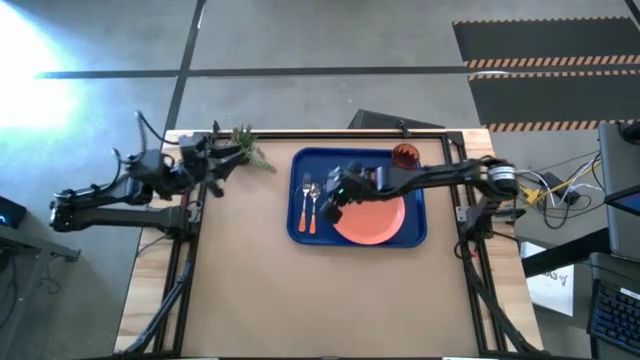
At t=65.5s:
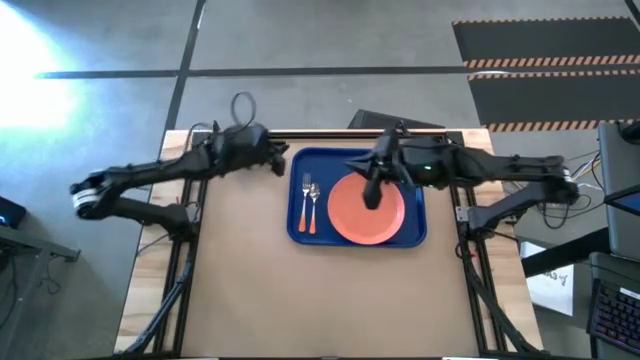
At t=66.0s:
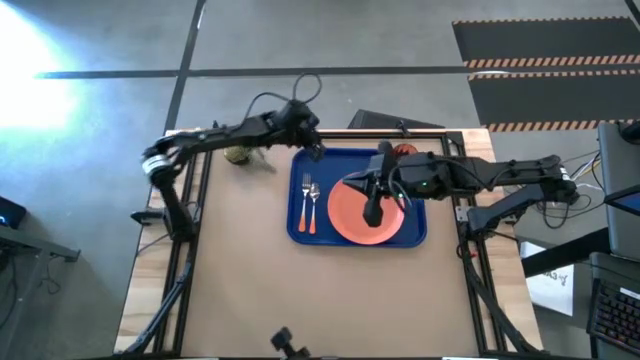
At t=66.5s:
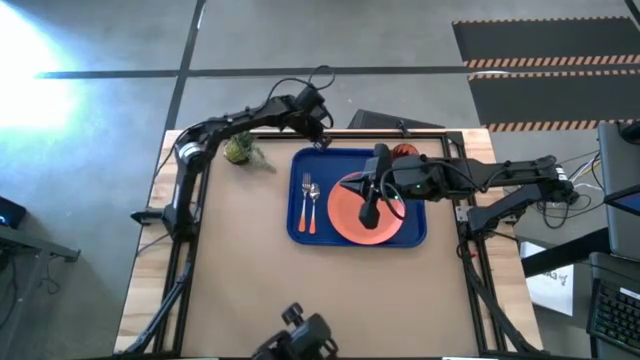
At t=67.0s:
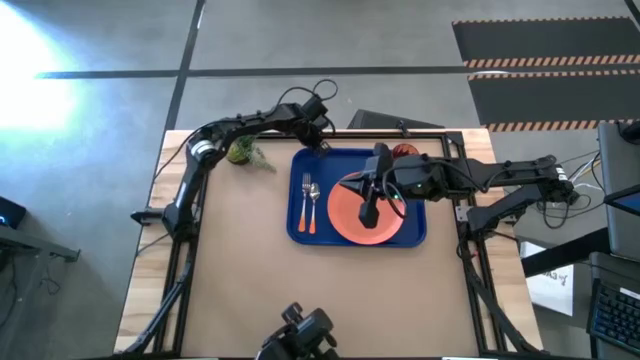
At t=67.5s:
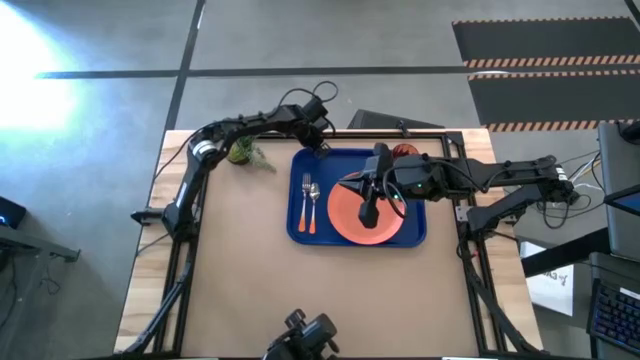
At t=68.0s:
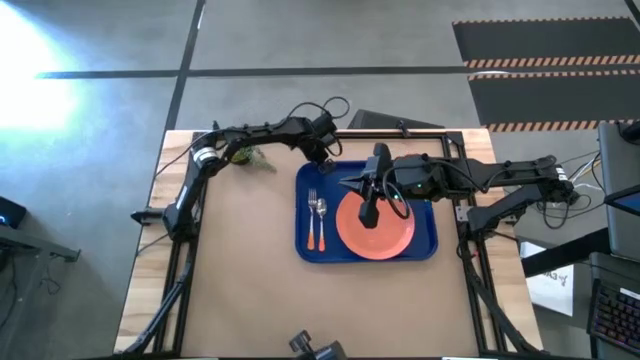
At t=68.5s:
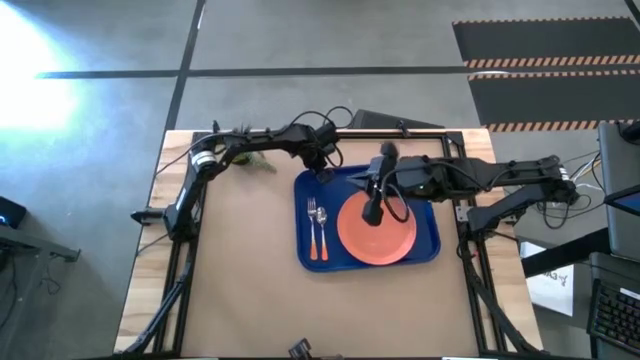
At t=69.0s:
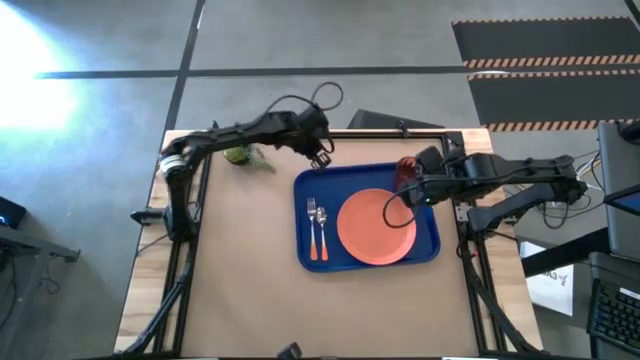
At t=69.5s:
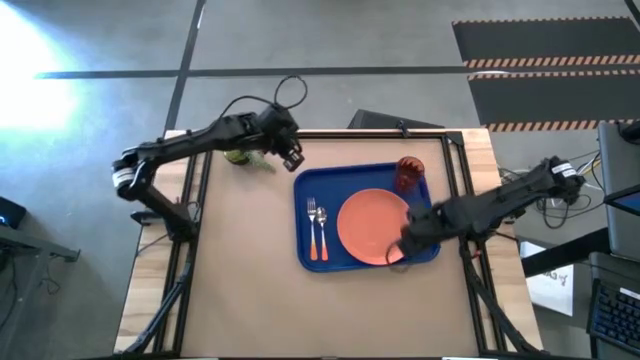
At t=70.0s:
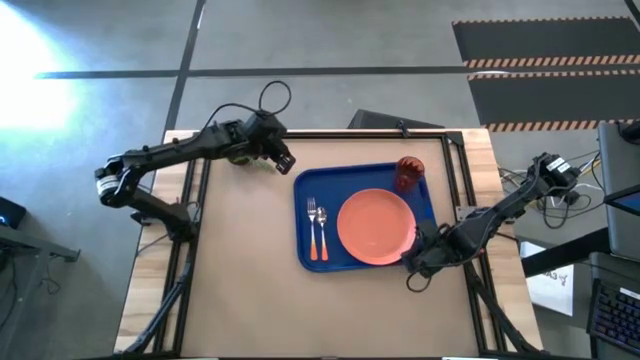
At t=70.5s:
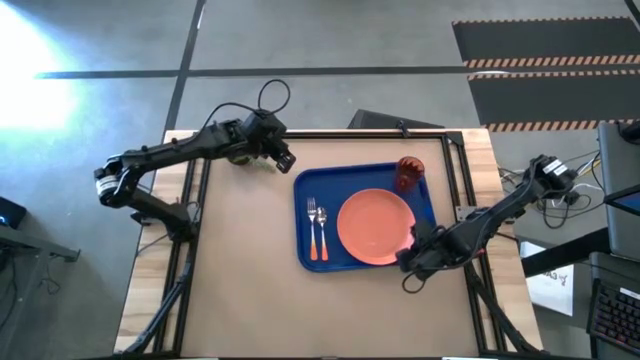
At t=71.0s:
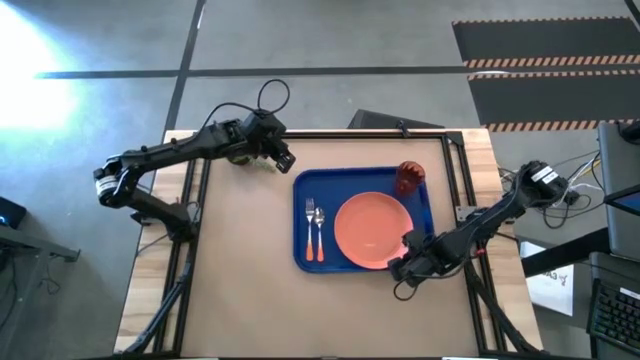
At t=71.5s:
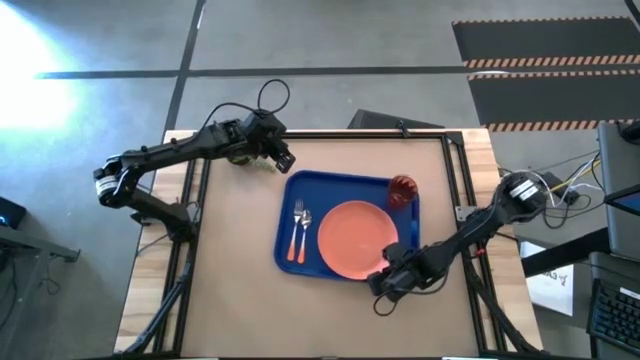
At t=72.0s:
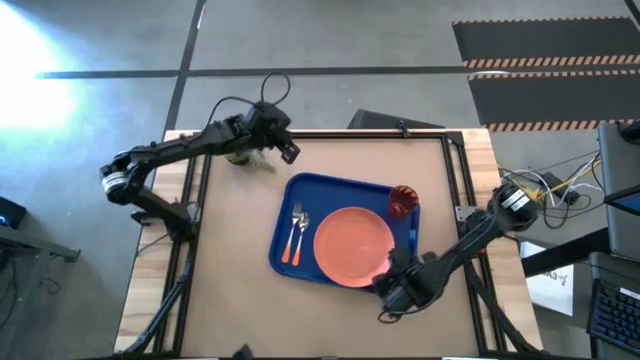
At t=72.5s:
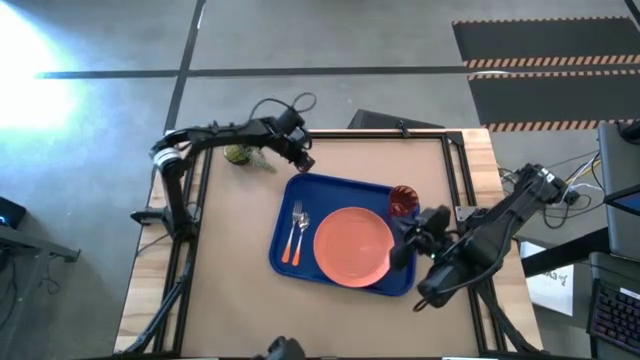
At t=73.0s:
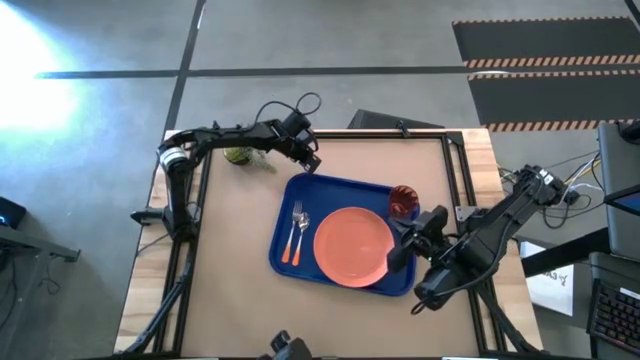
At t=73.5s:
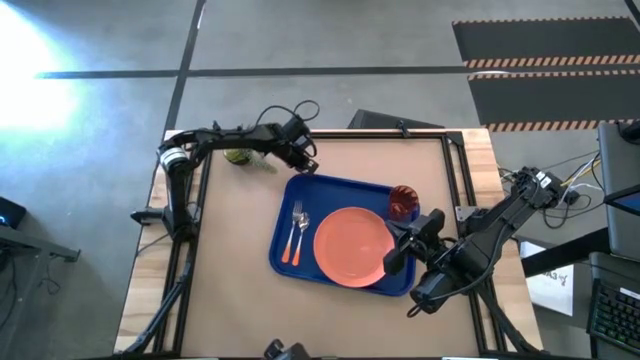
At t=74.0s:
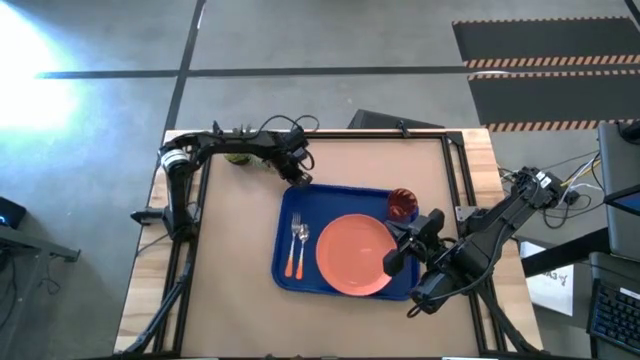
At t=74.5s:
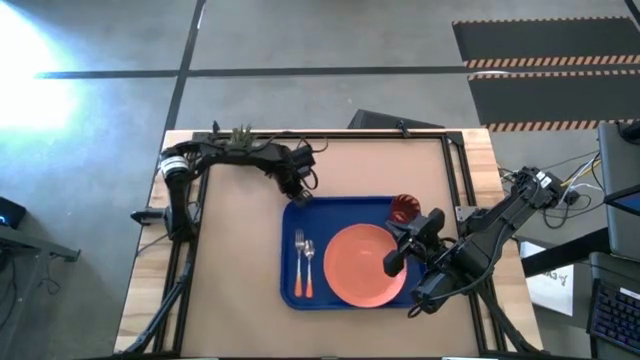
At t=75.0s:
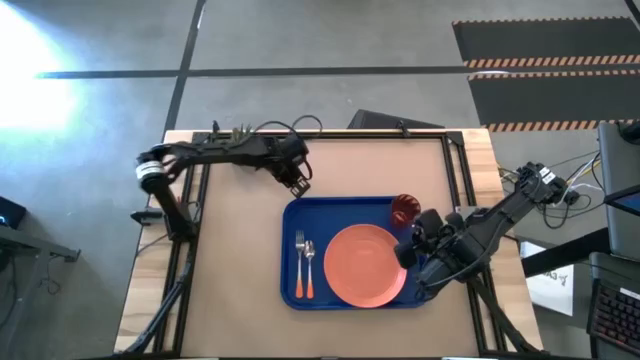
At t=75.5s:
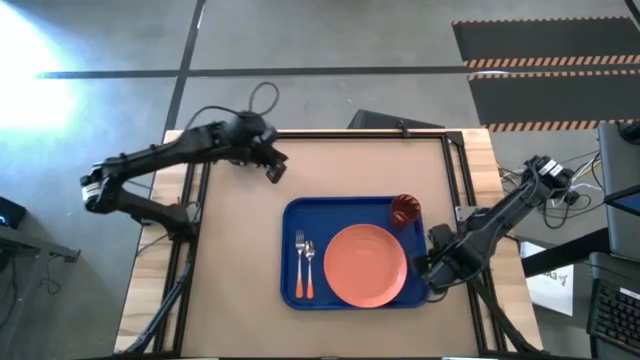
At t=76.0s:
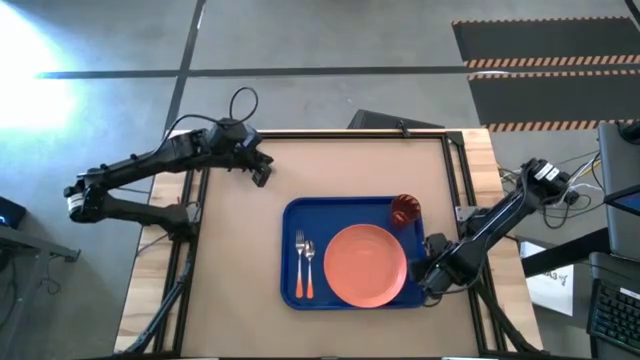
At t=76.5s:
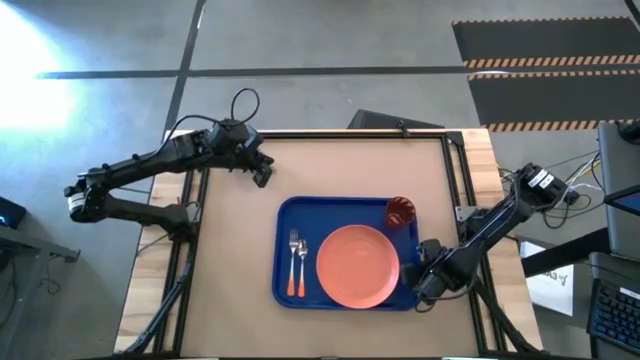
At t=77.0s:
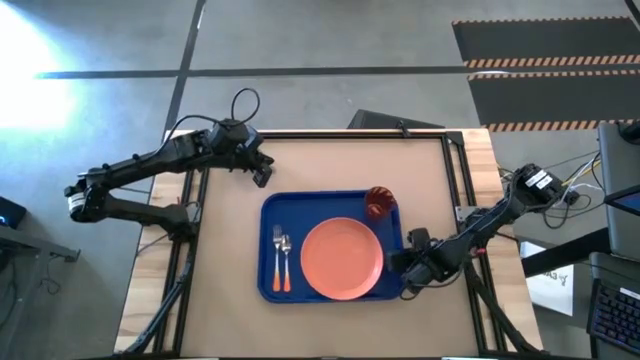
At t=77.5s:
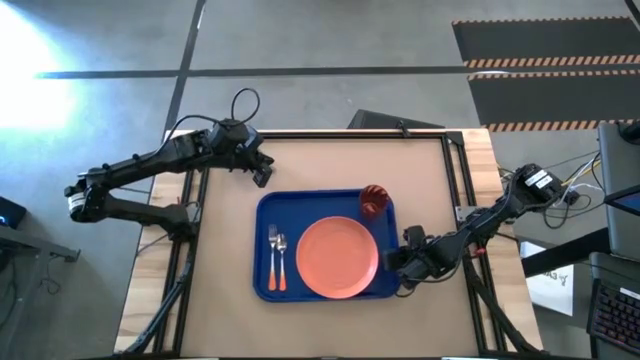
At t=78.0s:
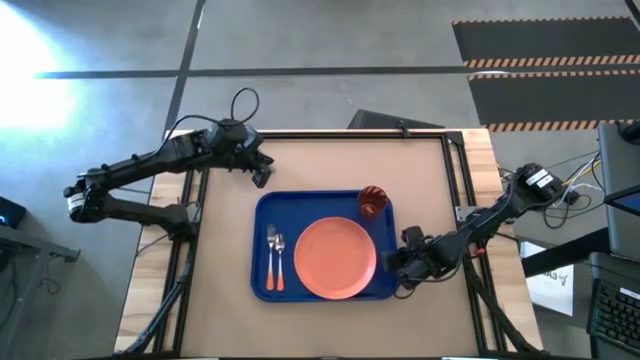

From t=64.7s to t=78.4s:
Task: Pick and place plate/cup/fork/spoon on tray
Move the blue serving tray to the center of the table

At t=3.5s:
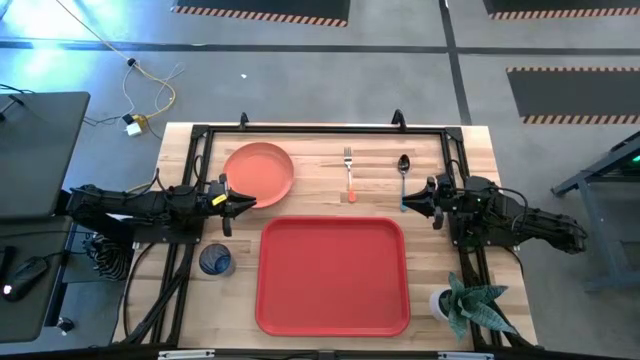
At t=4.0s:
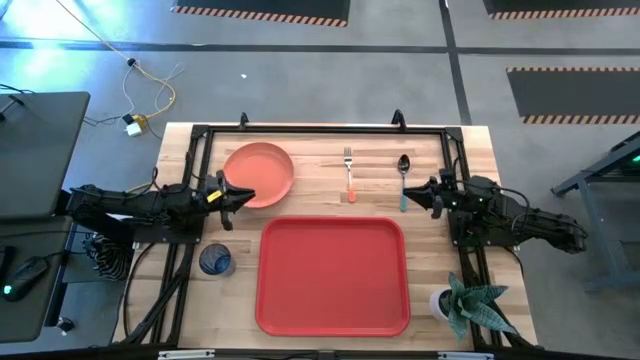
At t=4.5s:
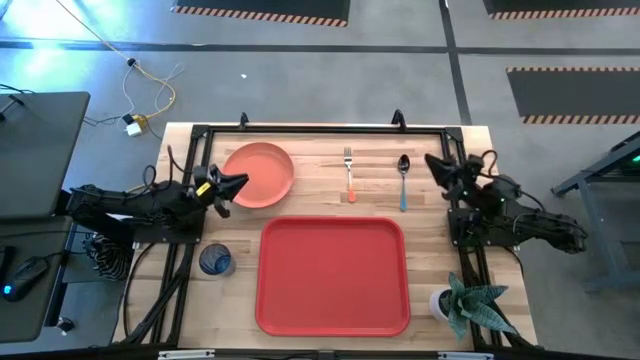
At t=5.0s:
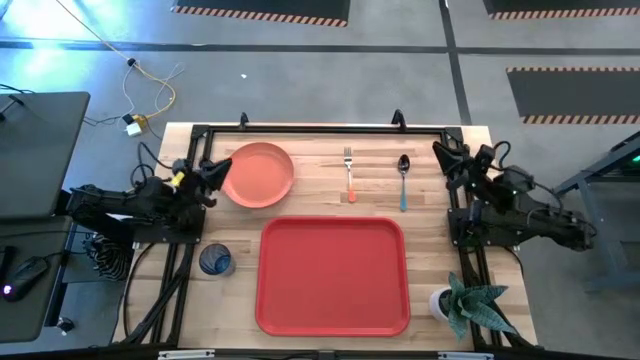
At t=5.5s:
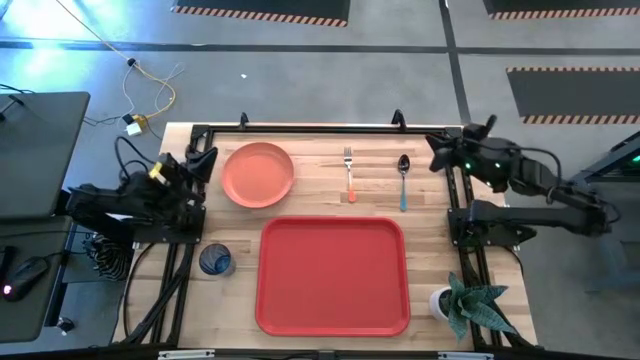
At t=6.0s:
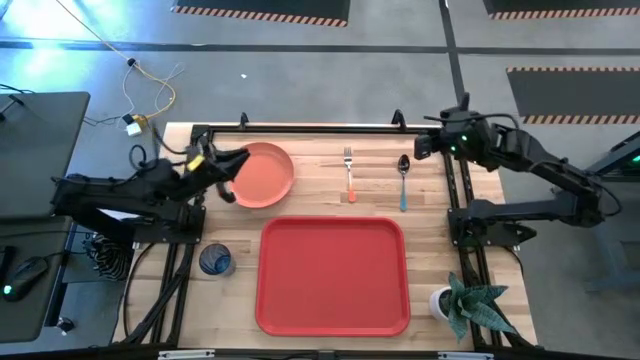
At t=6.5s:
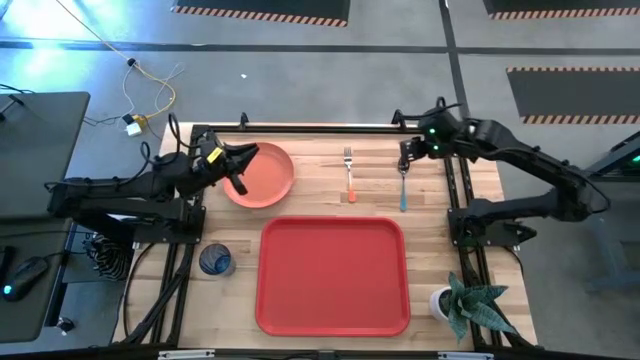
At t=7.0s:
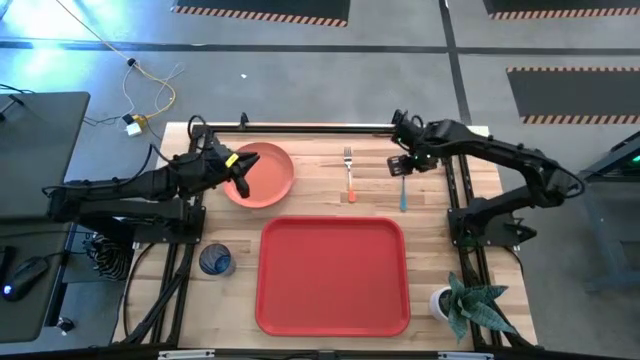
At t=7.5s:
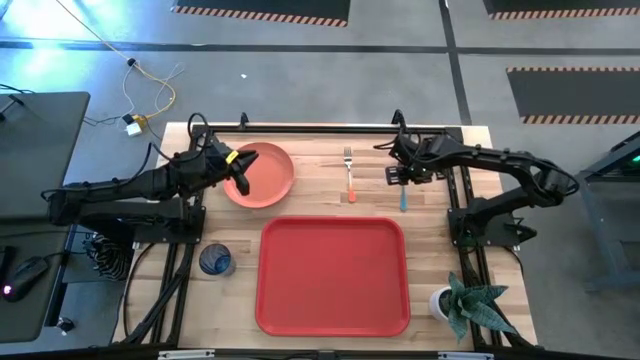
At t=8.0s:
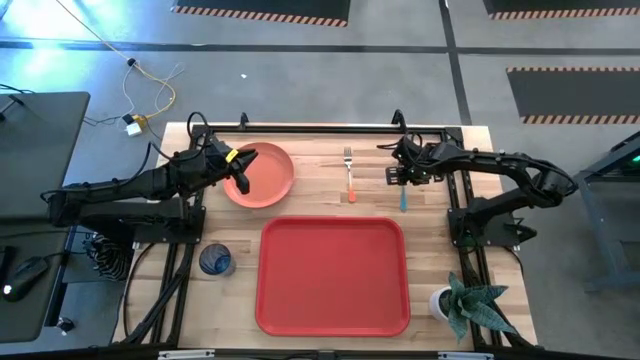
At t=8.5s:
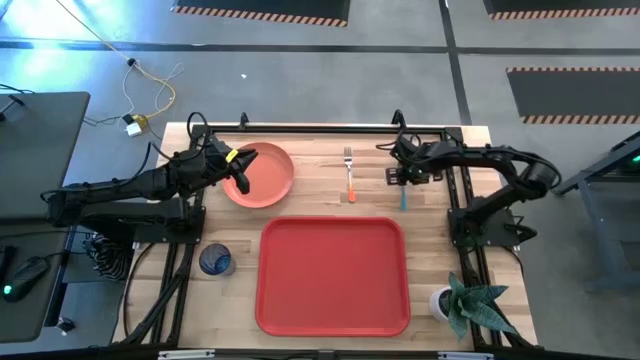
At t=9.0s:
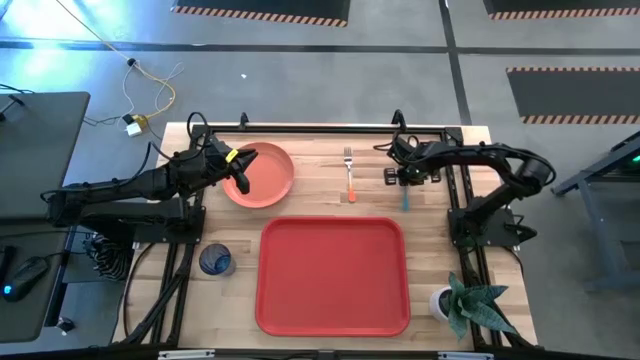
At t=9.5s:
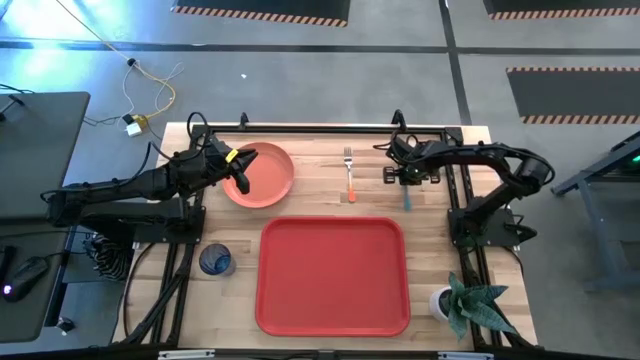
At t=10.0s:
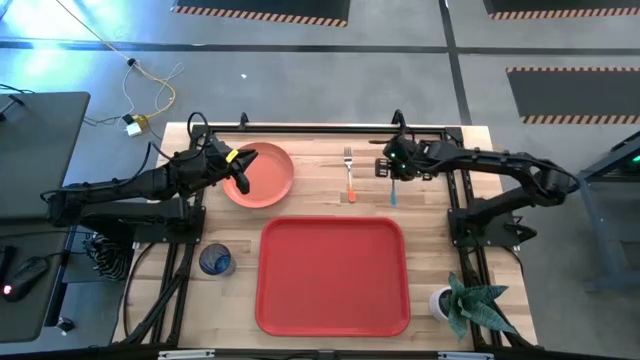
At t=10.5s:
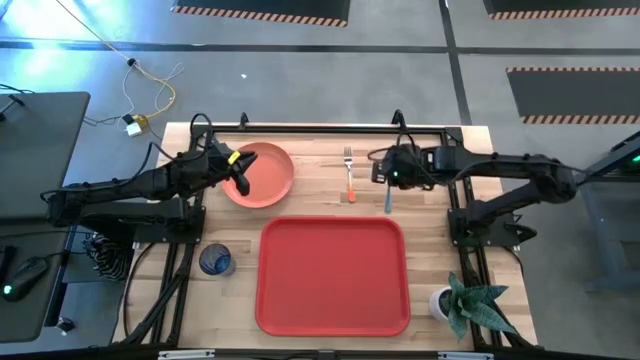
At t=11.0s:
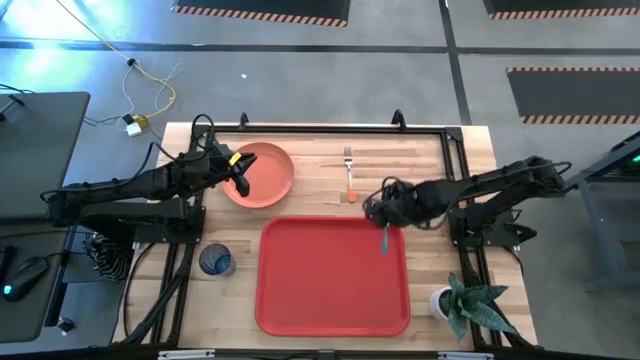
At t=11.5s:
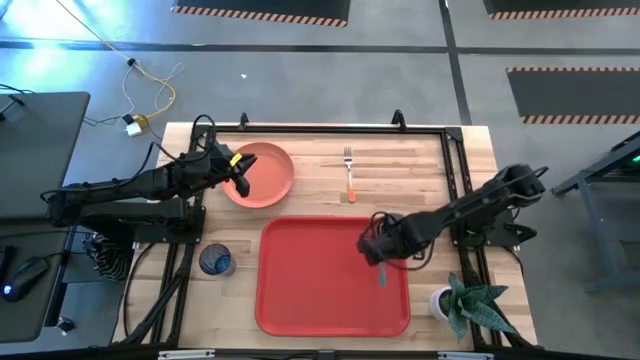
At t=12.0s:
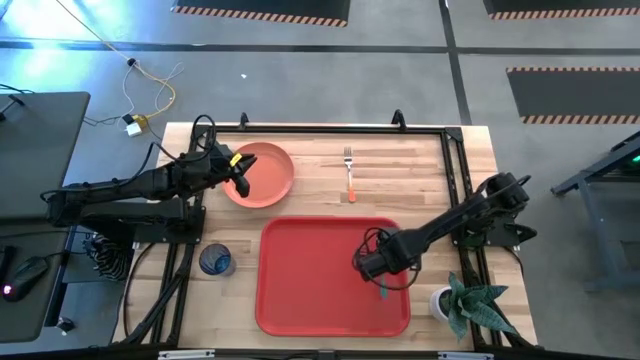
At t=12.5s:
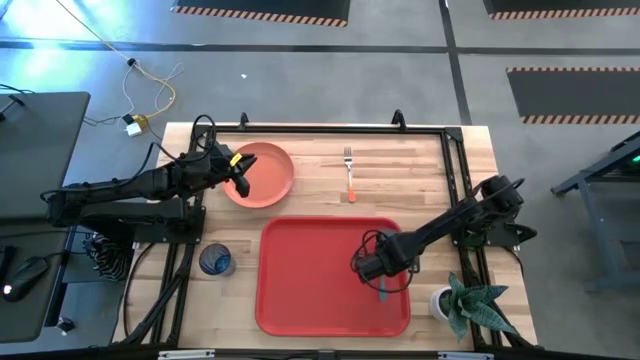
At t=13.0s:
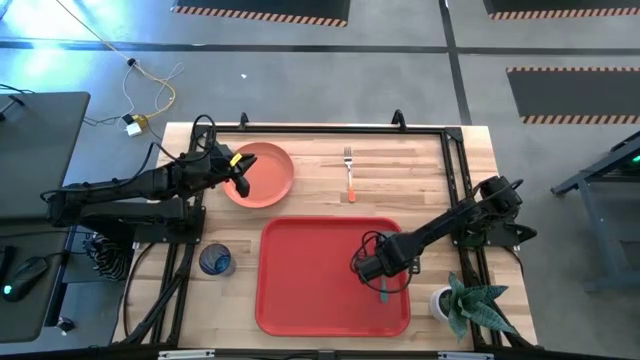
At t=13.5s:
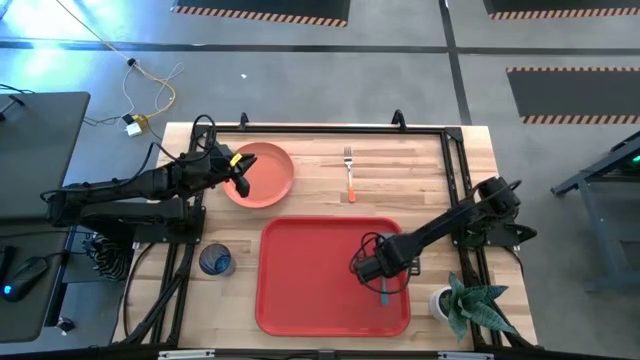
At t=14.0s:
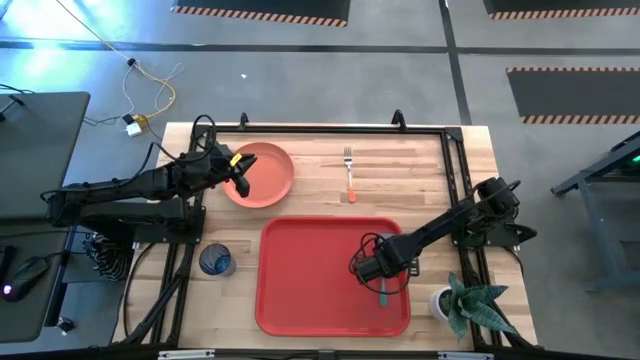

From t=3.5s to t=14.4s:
Task: Pick and place plate/cup/fork/spoon on tray
Put the blue spoon on the red tray
